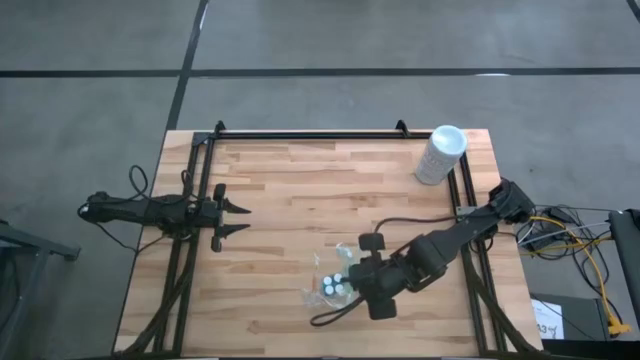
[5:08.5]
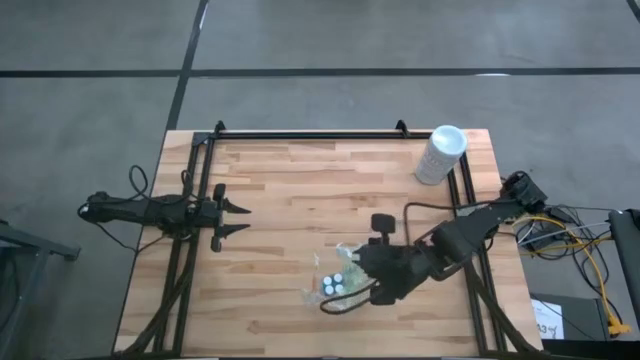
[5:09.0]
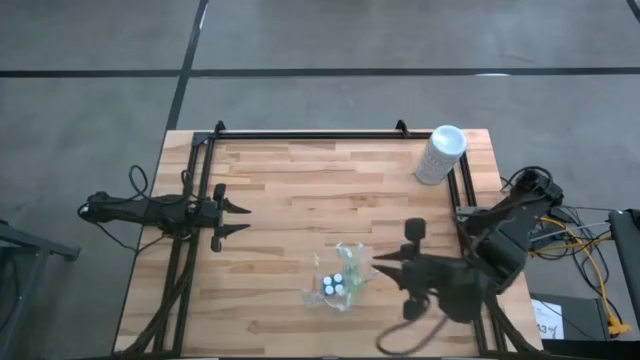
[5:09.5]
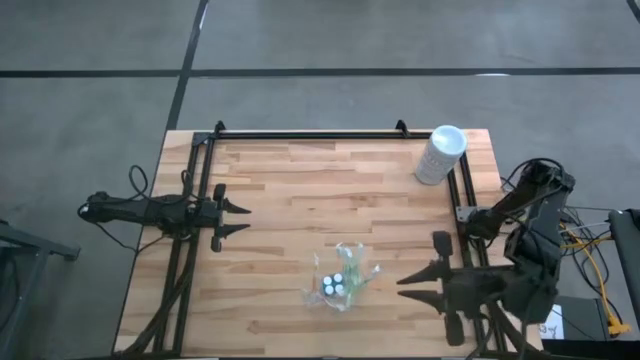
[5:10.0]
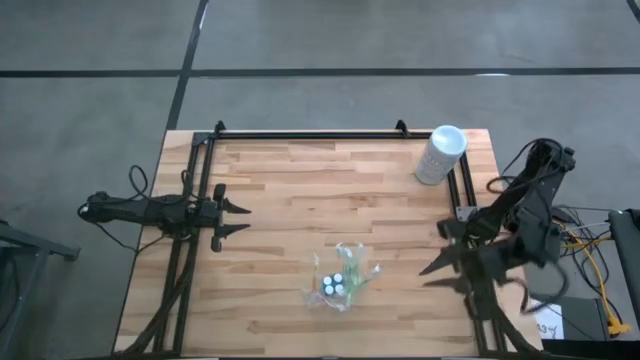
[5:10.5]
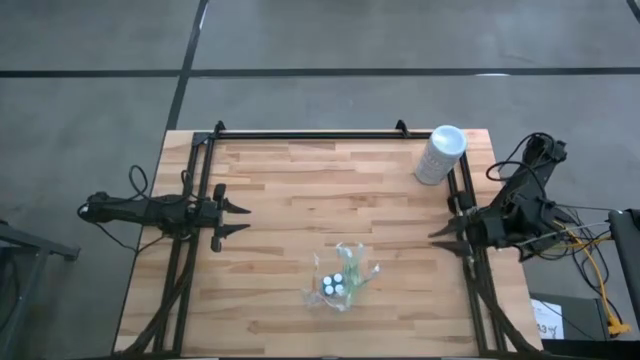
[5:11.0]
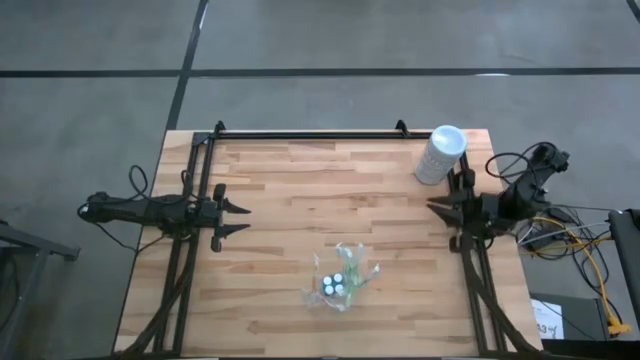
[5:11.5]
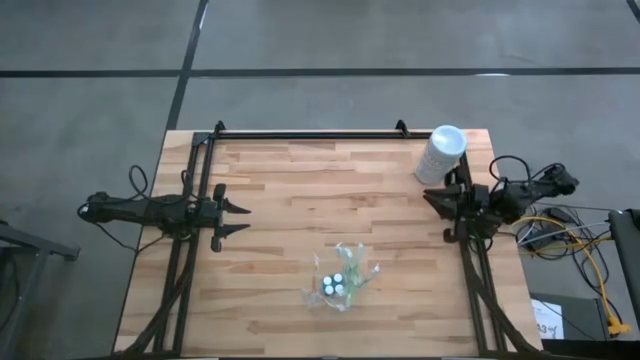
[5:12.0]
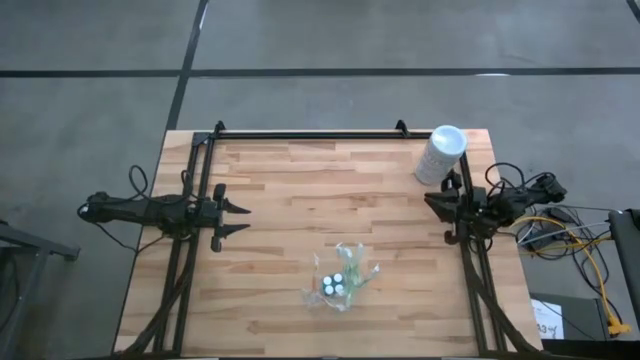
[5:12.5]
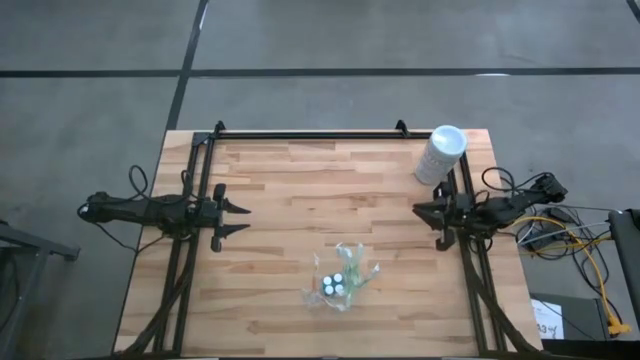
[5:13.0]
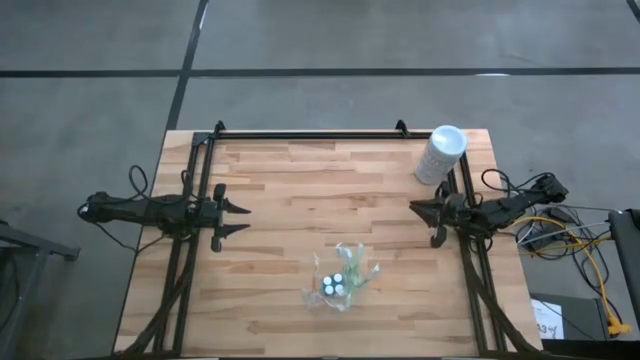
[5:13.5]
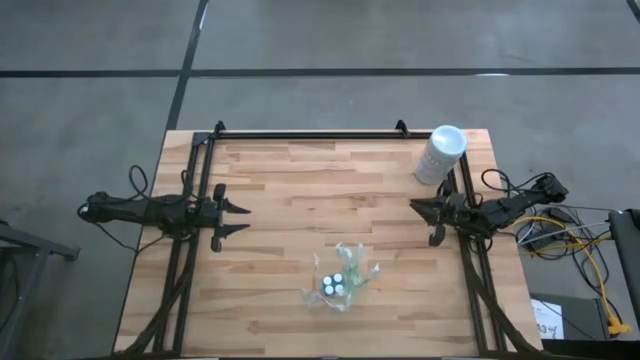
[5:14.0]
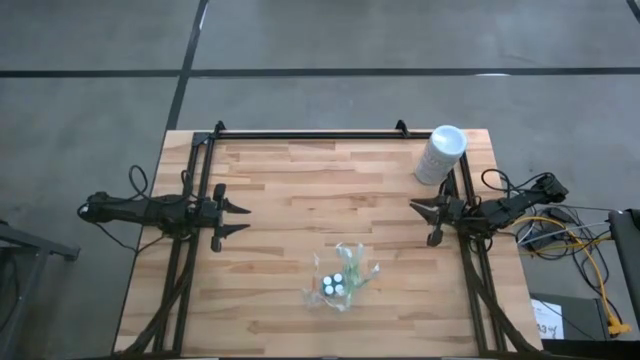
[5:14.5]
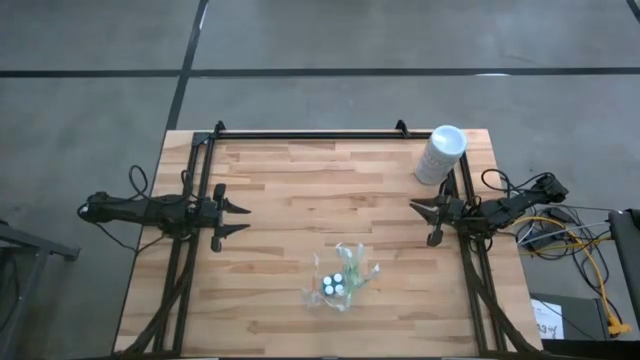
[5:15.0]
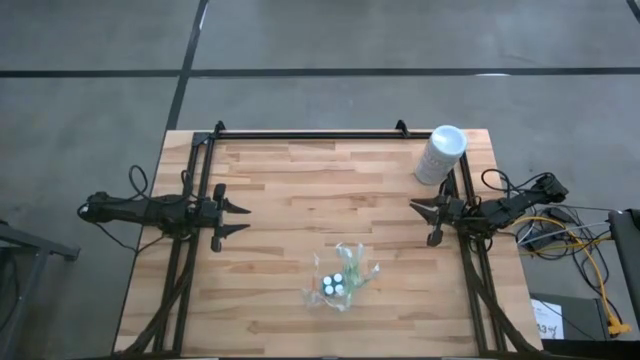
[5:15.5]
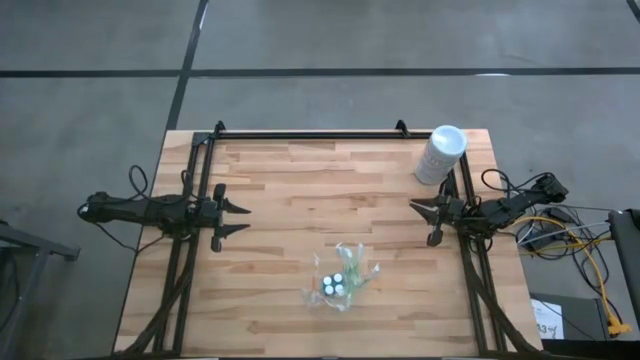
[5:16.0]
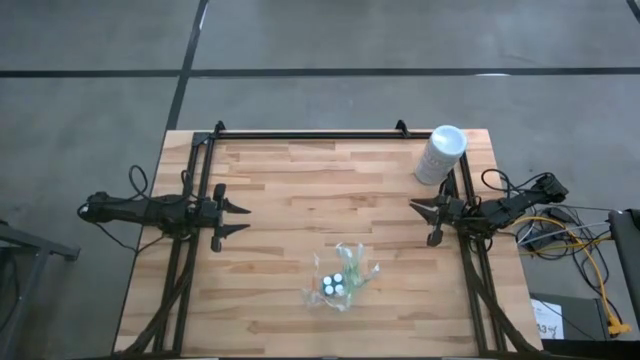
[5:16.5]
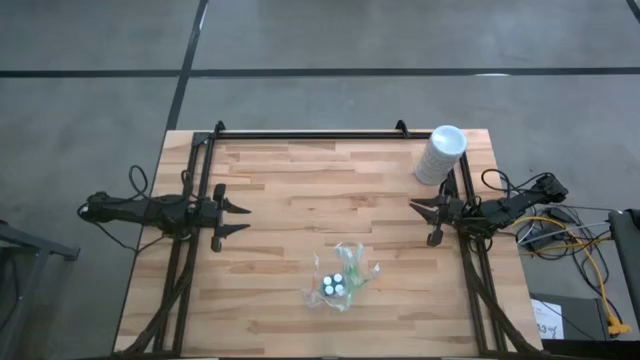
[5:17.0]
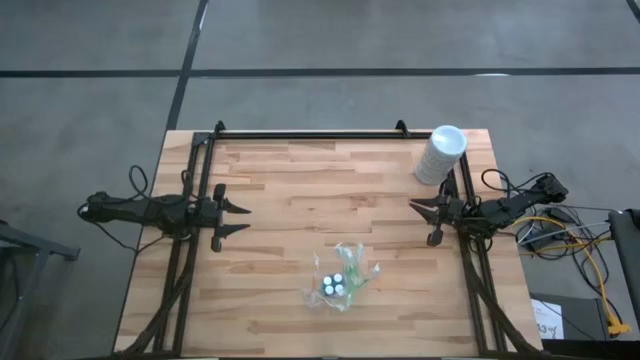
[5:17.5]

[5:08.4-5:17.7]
Task: Pick & Place toothbrushing station
Return to Home Position

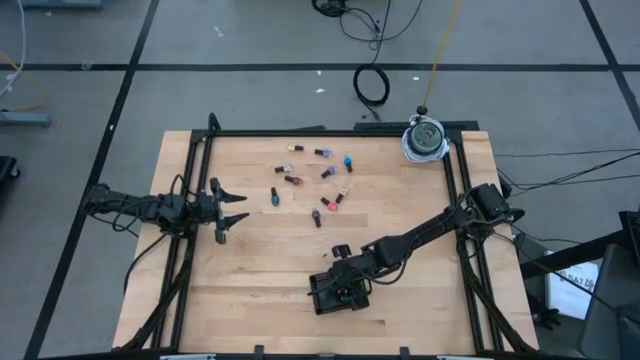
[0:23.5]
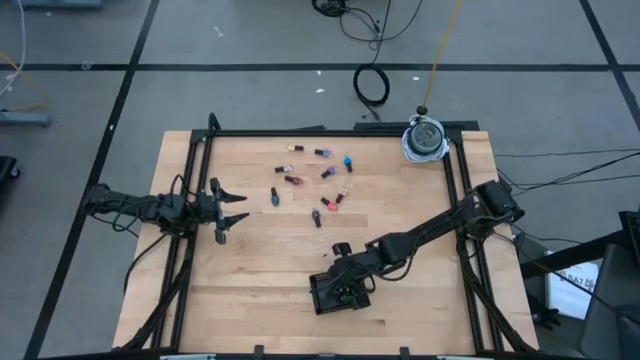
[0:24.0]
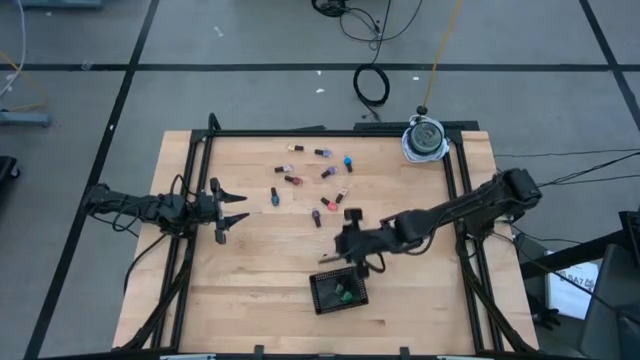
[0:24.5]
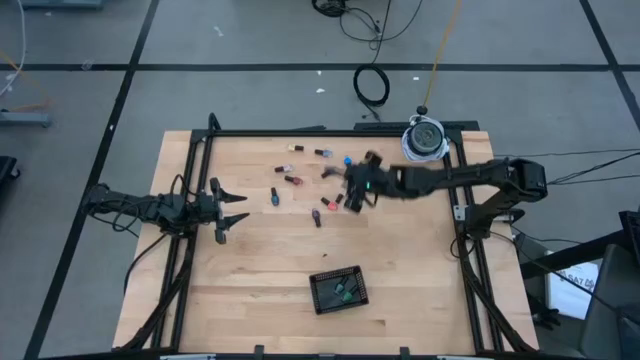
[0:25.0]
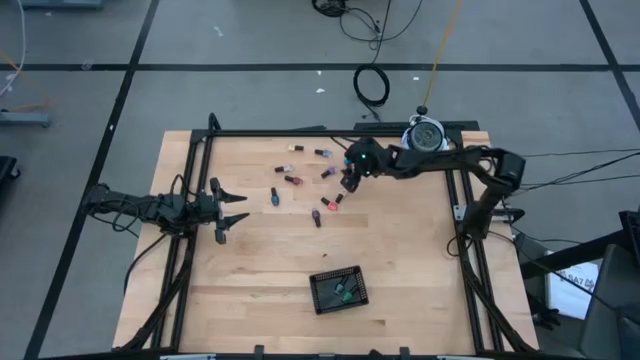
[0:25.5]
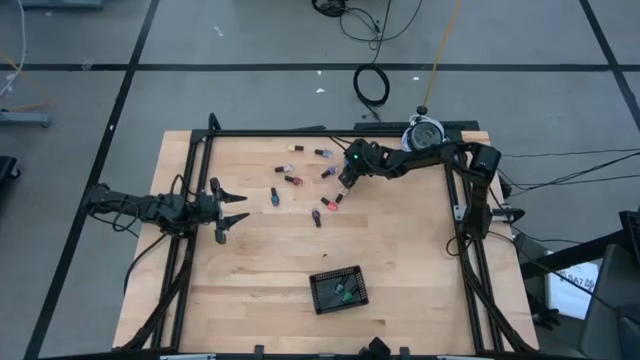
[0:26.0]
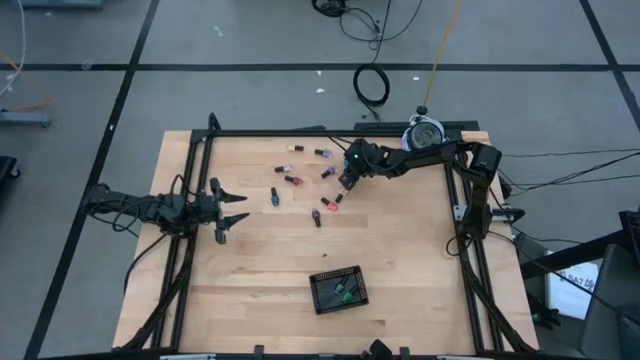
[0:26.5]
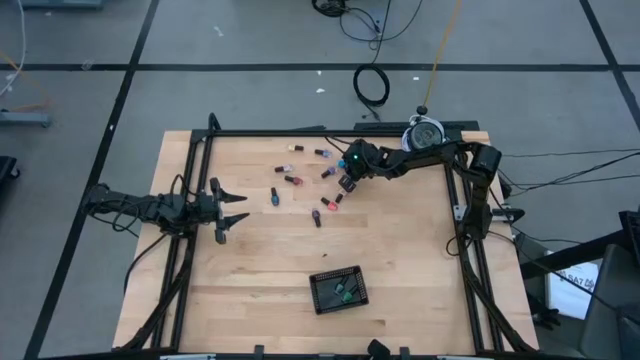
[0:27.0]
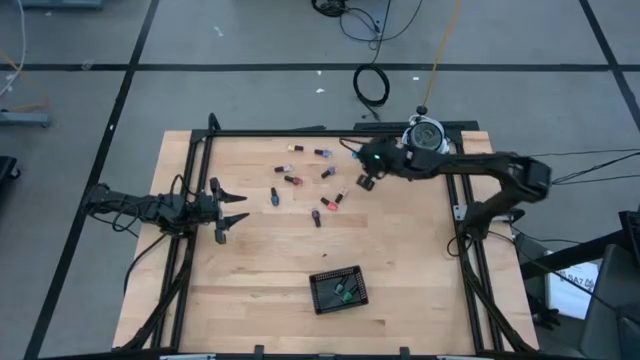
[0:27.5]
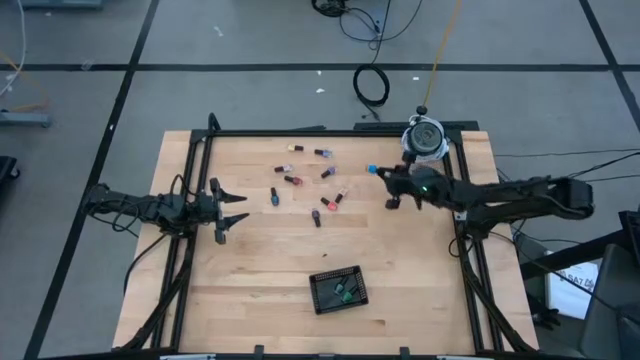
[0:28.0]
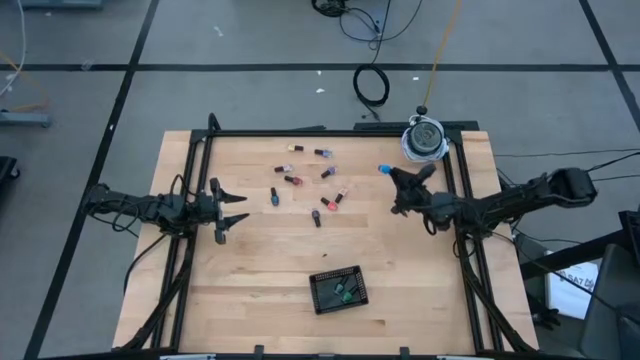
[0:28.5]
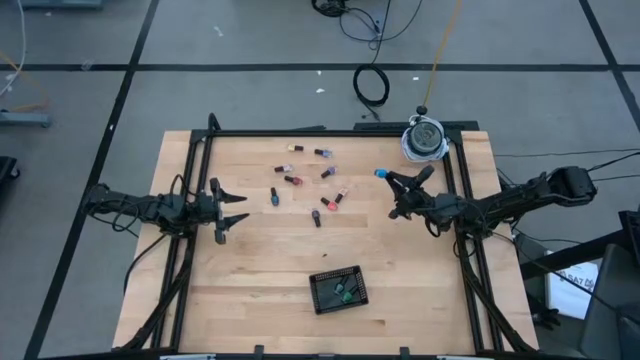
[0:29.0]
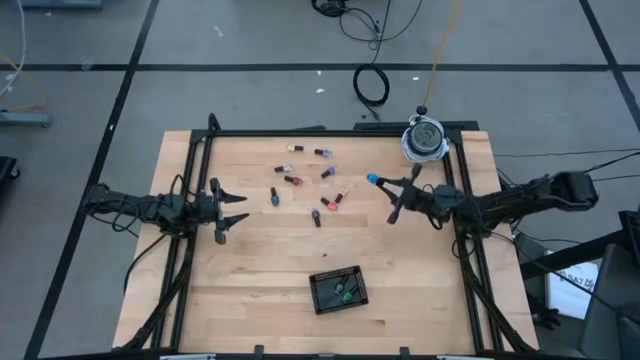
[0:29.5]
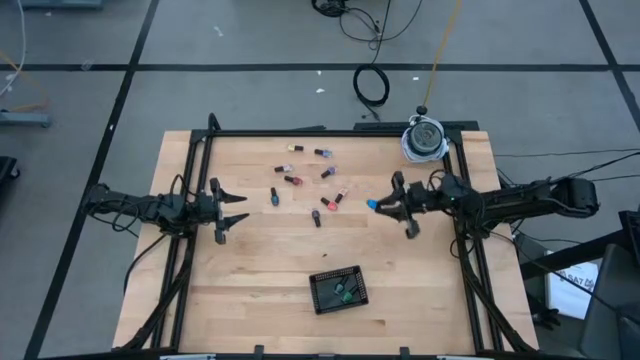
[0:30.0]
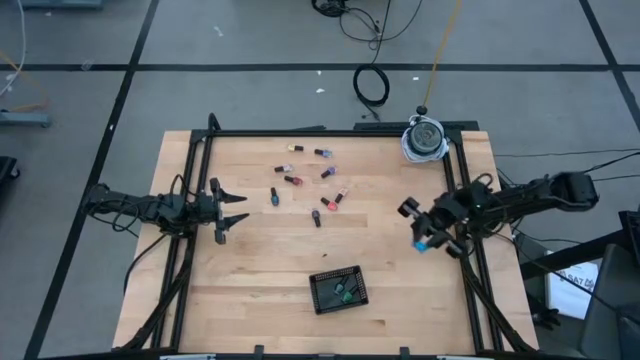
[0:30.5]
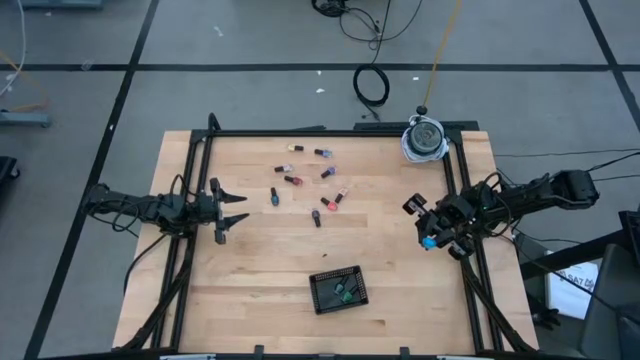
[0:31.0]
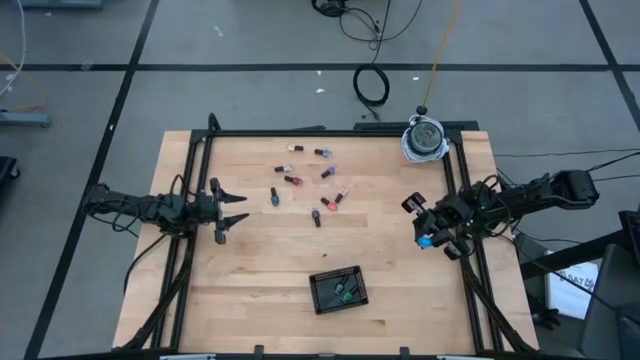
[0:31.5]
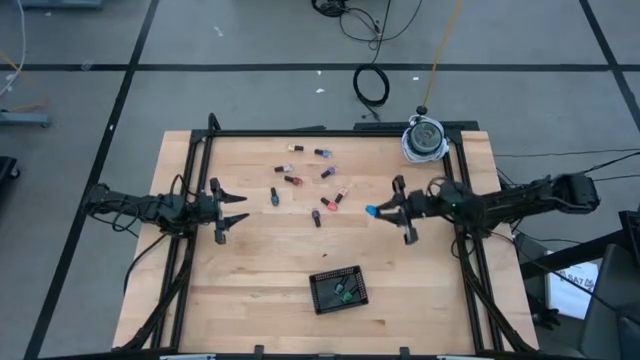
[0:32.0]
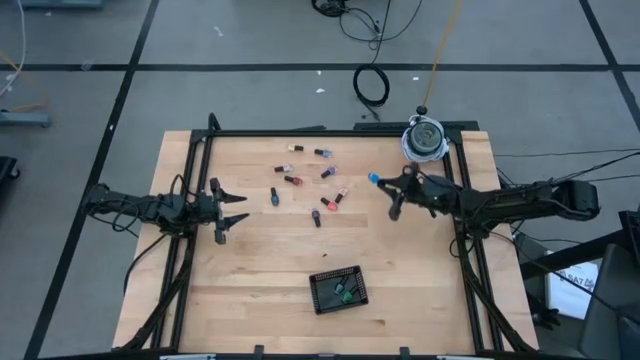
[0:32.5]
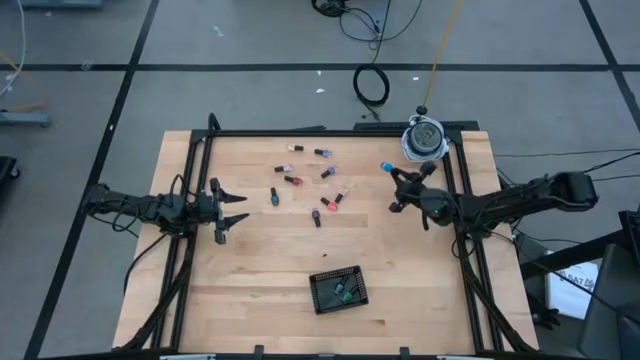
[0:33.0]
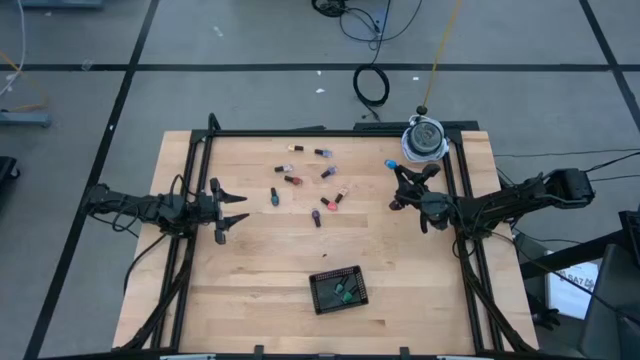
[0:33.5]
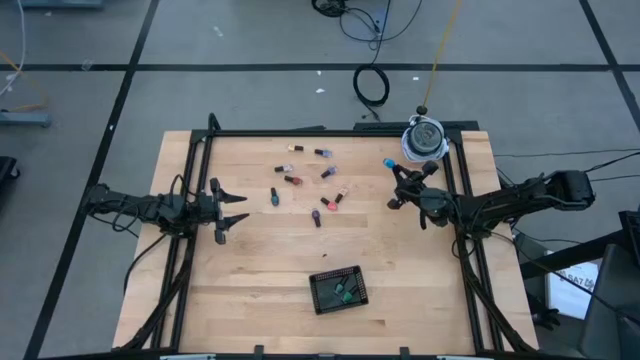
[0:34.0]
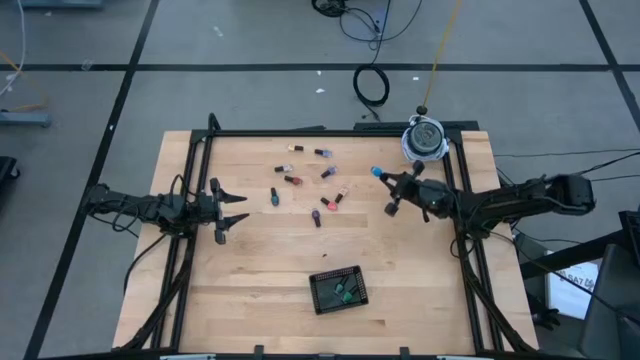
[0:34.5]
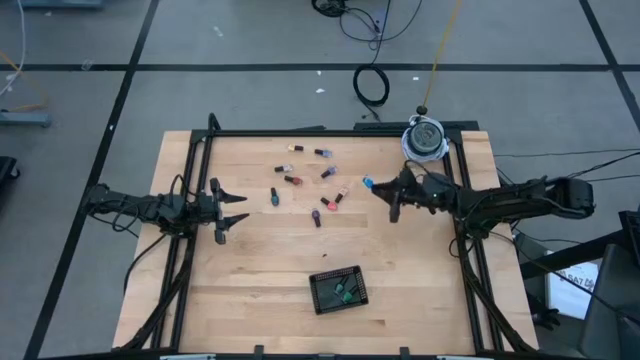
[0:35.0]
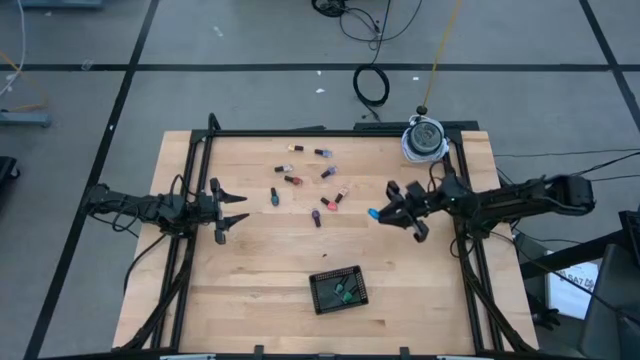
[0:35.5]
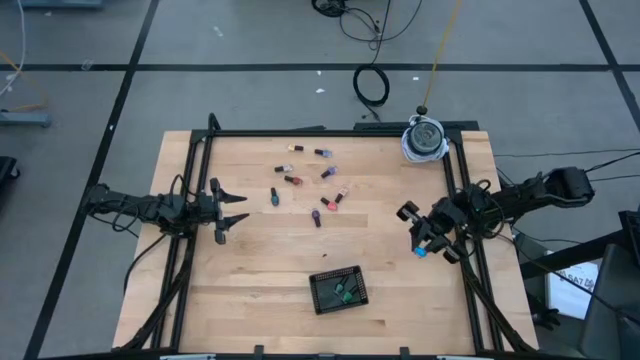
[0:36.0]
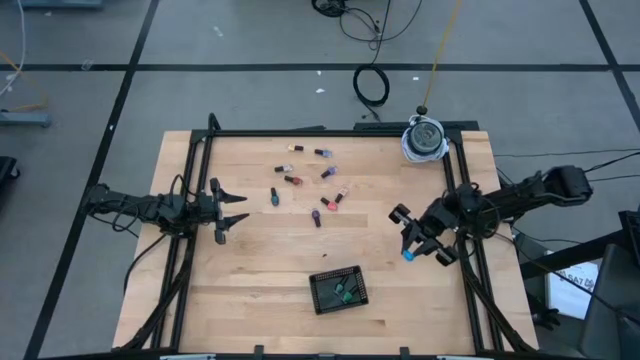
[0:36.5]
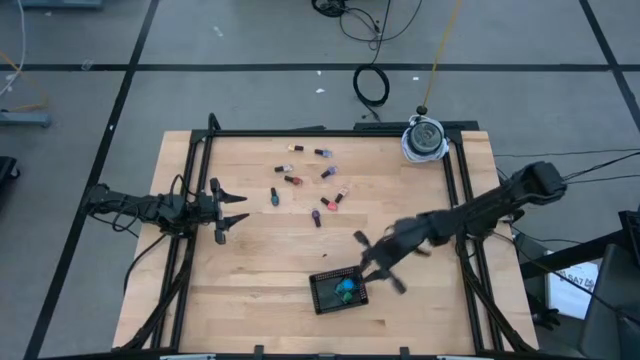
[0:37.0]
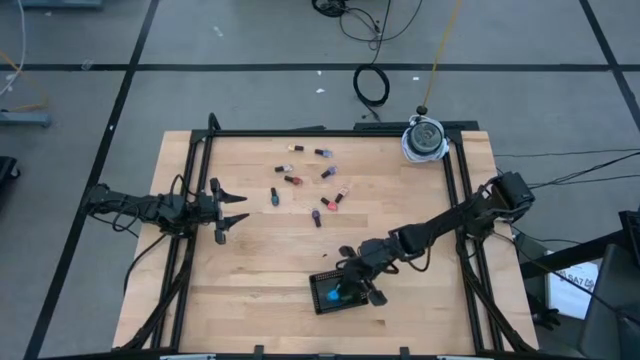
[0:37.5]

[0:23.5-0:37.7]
Task: Pick & Place Nail Polish
Put the light blue nail polish bottle into the black bin
